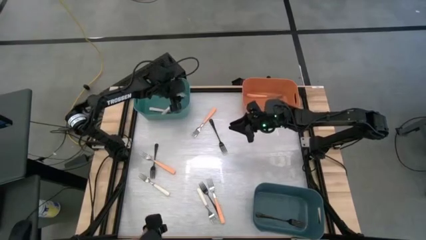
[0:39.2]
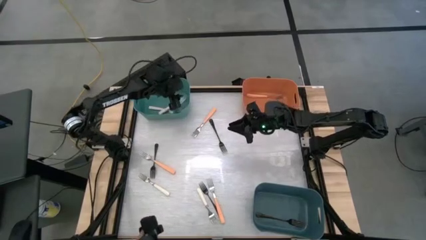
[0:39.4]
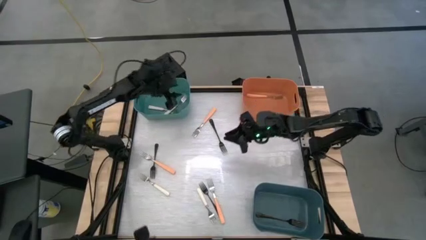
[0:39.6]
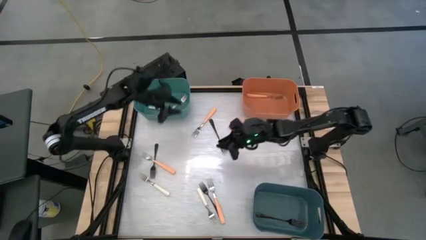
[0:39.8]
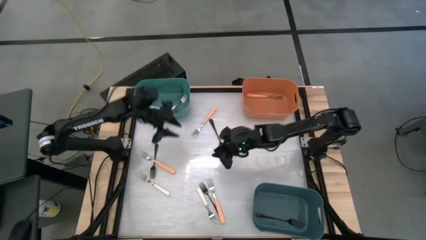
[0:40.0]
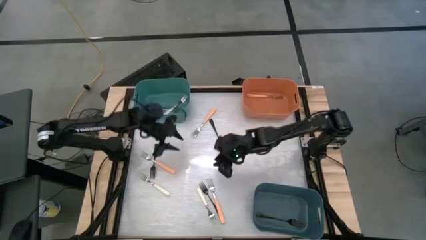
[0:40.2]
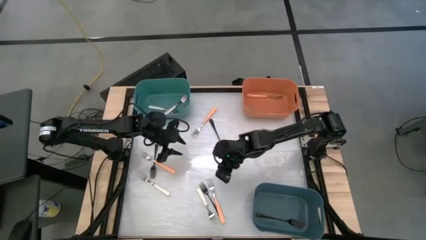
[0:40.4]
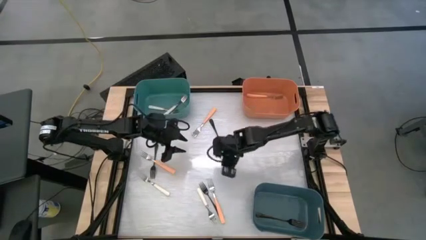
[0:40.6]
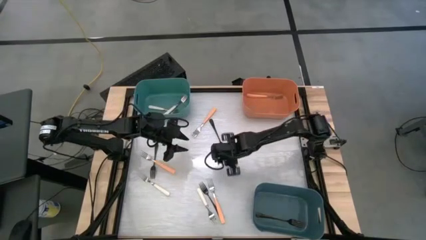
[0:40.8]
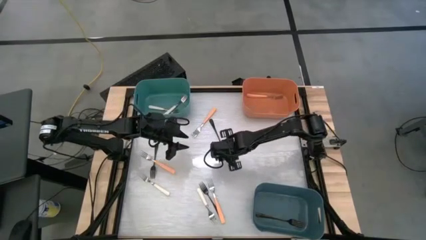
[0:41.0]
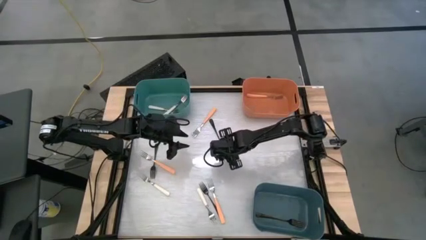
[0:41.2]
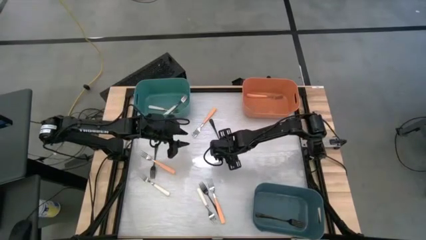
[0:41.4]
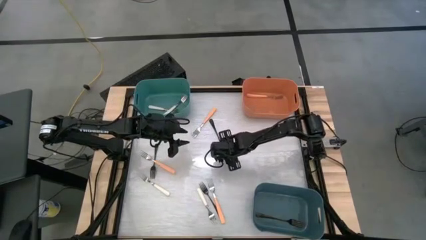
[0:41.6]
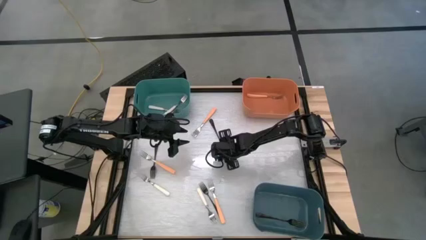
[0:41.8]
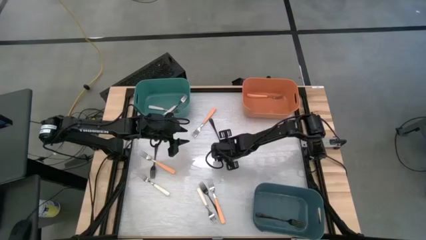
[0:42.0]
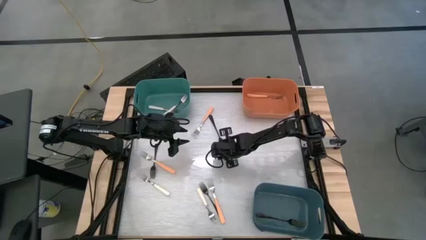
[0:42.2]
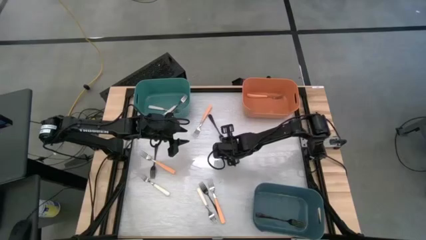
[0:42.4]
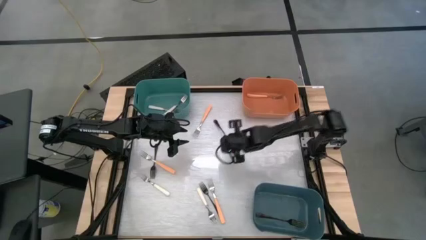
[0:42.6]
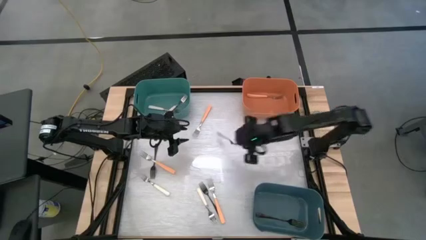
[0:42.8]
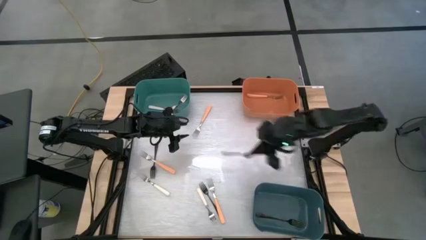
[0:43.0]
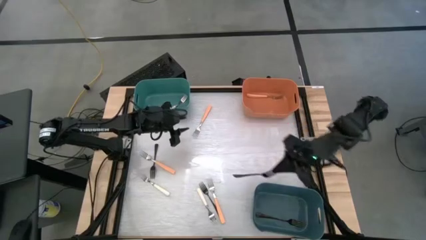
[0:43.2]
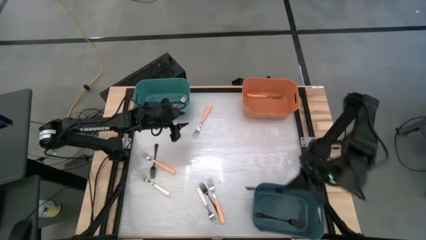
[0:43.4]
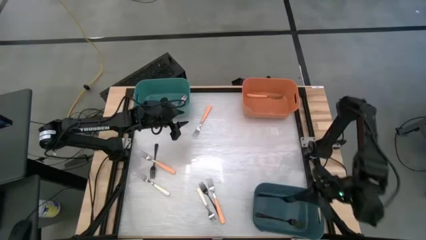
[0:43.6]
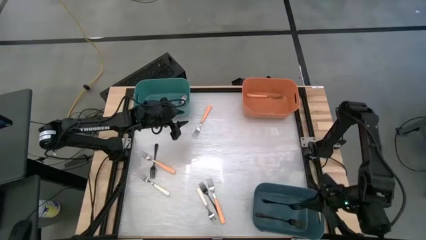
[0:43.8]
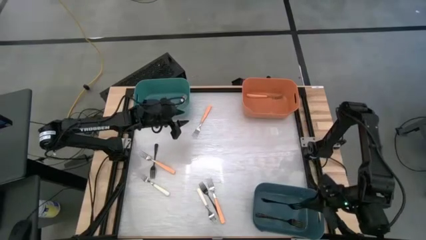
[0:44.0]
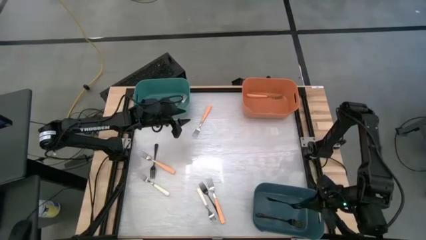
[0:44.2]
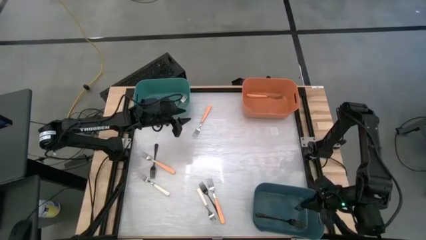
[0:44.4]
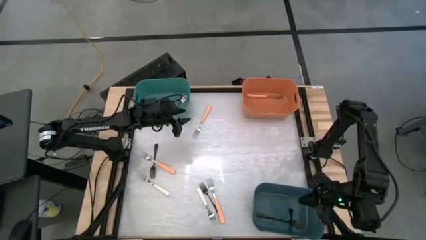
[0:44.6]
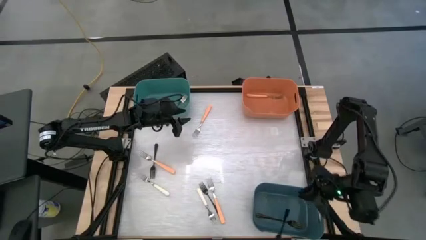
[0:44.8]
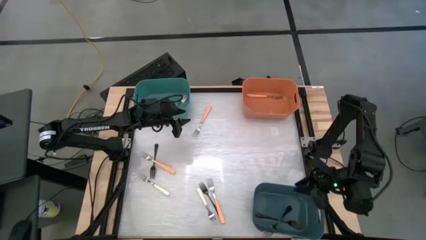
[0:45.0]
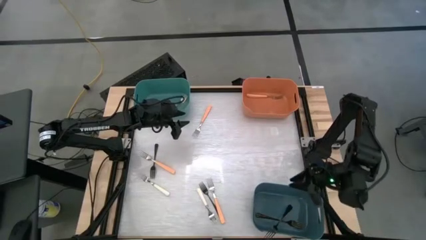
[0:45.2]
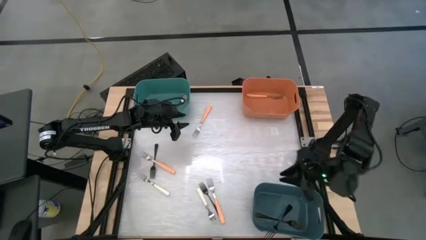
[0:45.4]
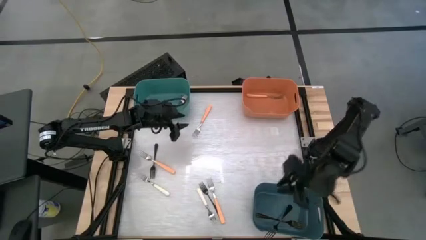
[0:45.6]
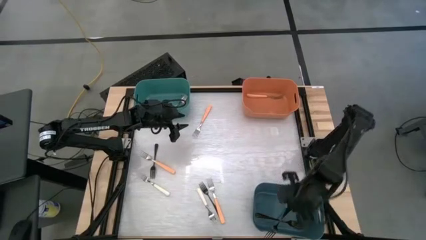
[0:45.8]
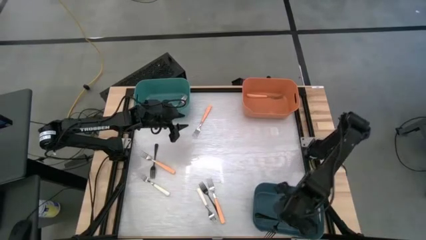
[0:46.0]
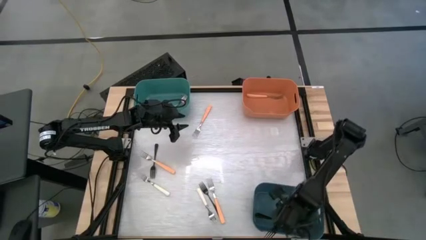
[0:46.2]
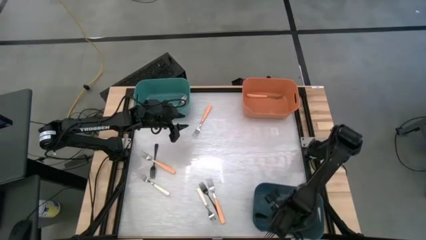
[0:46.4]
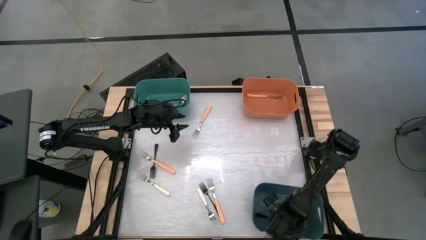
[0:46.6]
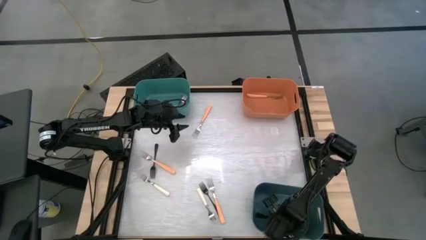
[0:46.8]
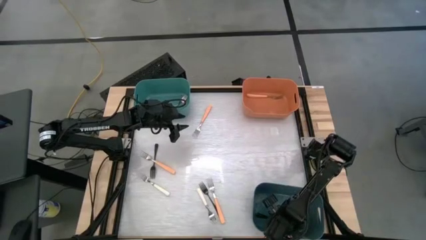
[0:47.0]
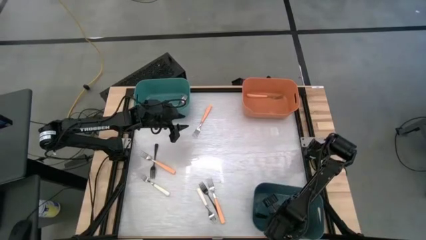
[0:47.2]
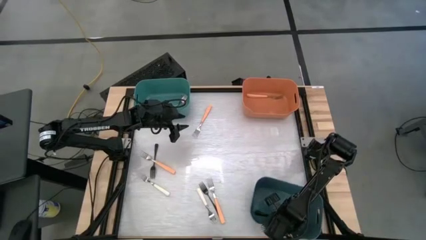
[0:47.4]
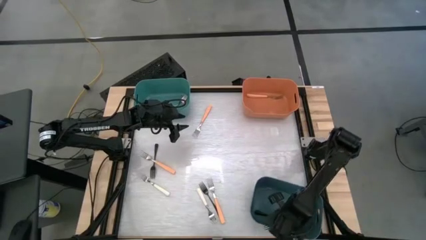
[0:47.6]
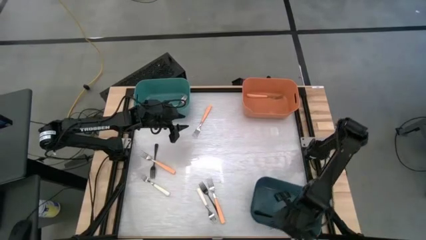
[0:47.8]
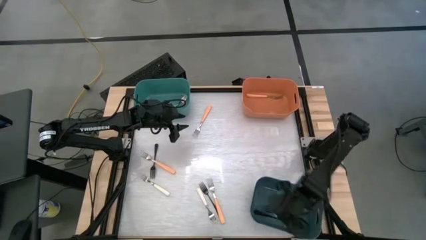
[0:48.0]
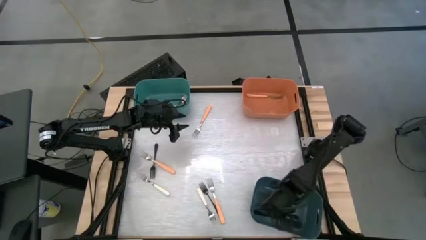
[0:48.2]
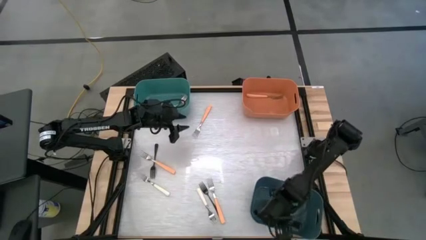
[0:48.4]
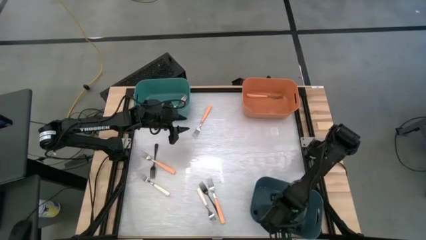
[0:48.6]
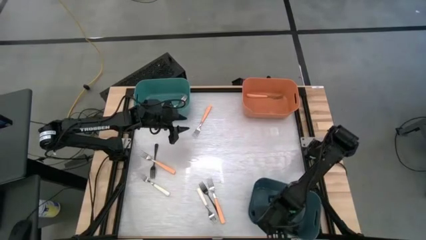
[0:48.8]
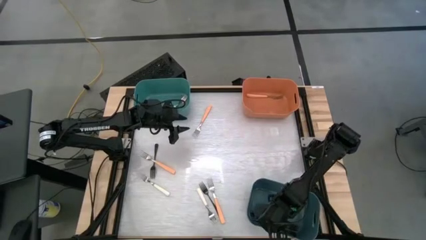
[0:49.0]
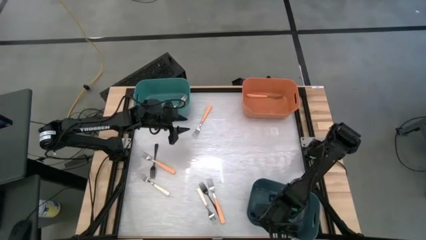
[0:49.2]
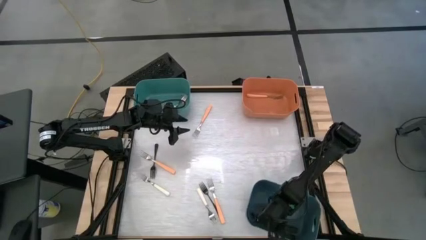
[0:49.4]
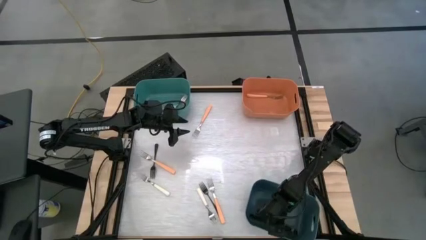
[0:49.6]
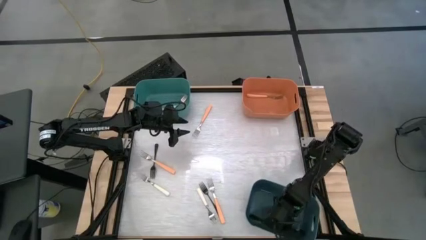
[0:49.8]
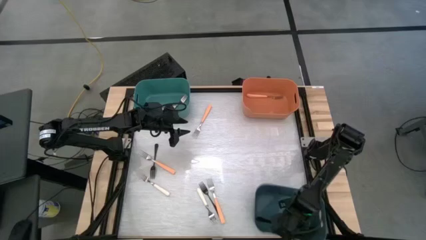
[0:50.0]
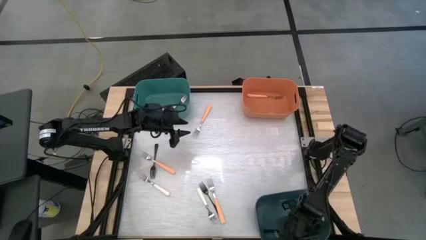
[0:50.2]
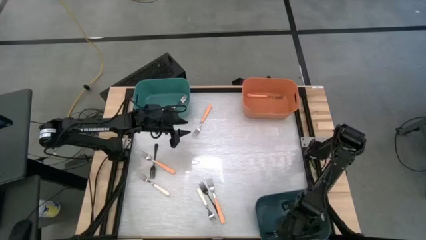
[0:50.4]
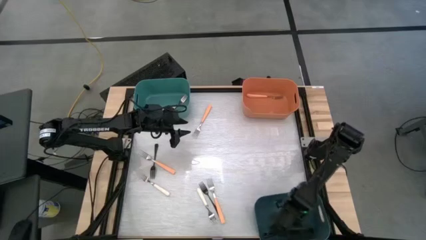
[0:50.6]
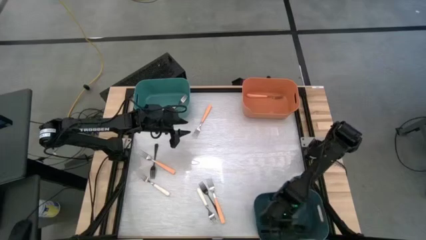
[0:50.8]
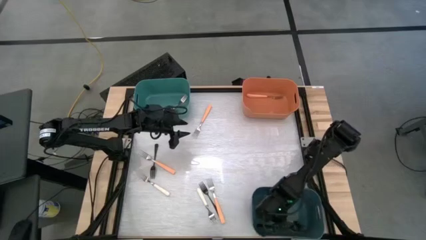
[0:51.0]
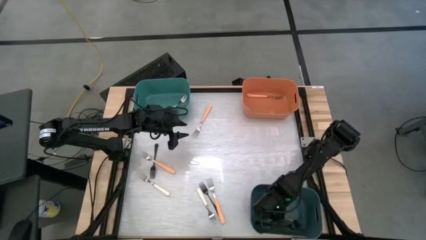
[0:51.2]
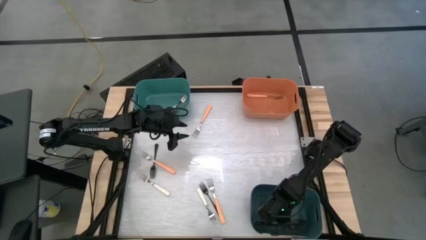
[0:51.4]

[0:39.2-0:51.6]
Task: Sort silverware by color (type)
Put the black fork into the blue bin

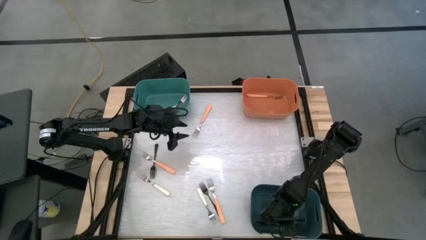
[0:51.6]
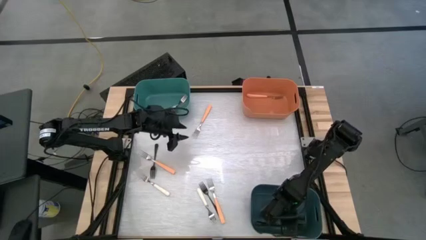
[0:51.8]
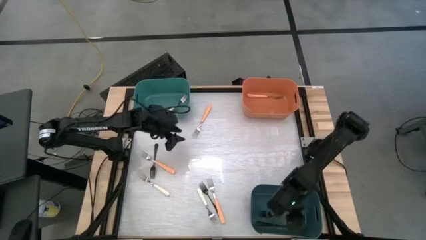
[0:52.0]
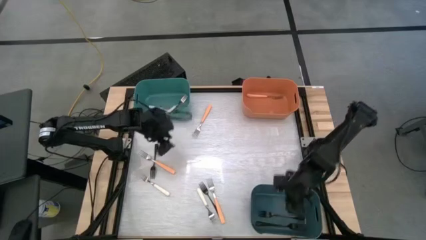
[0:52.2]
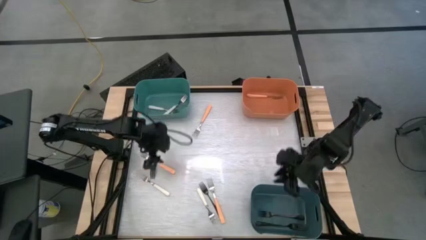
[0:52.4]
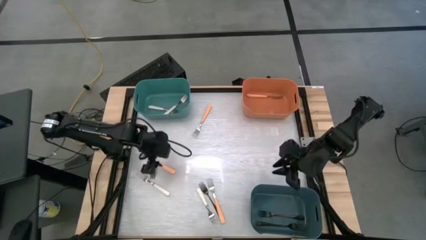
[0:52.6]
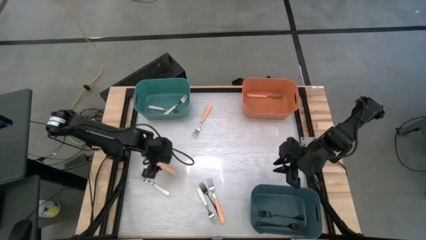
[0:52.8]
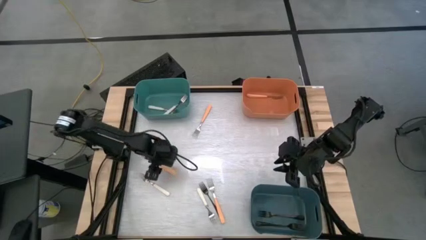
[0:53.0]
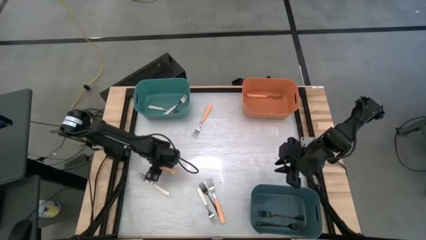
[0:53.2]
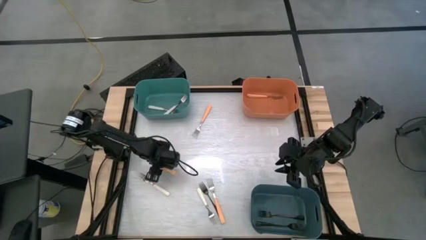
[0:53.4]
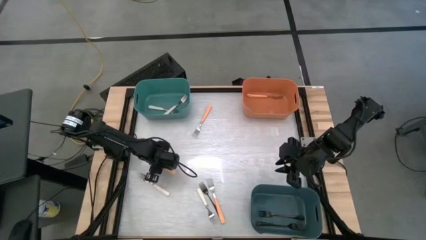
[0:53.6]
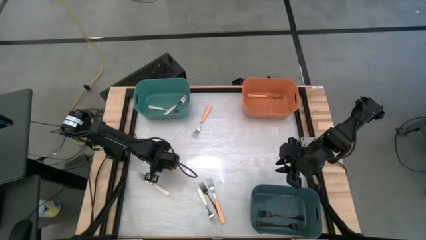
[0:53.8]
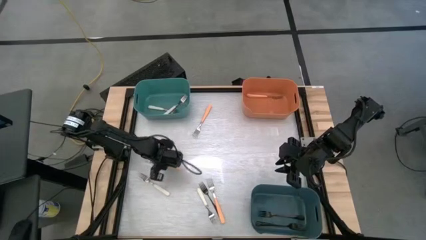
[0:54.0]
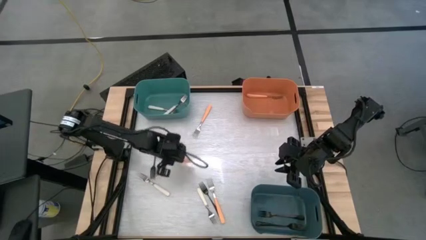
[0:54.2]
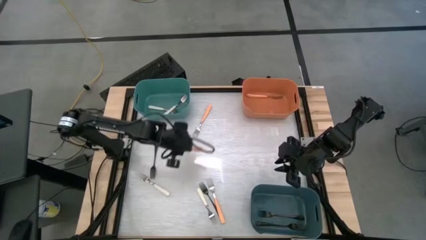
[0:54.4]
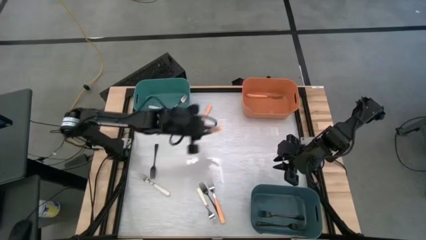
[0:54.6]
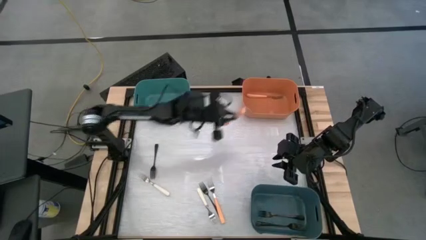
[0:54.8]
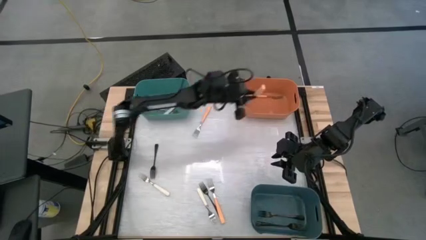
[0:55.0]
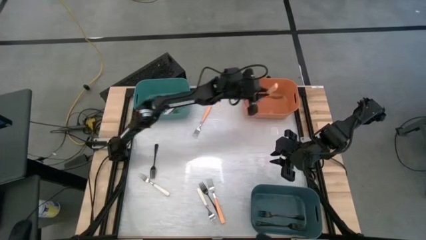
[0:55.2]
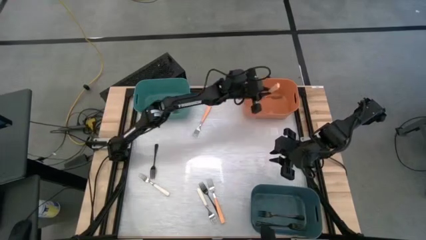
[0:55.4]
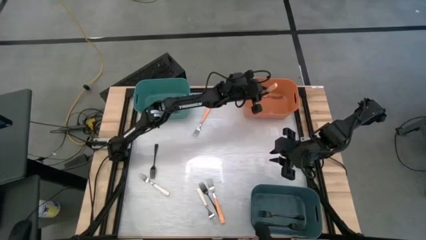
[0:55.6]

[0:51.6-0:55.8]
Put the orange fork into the orange bin
